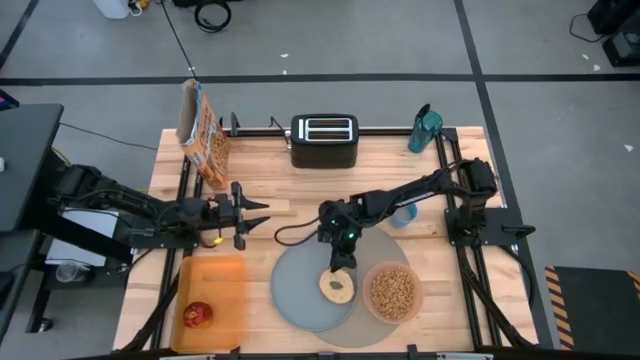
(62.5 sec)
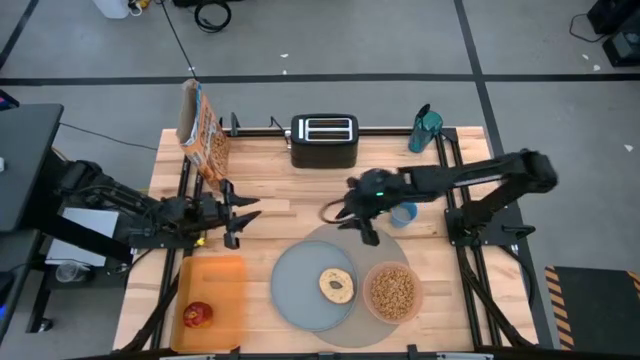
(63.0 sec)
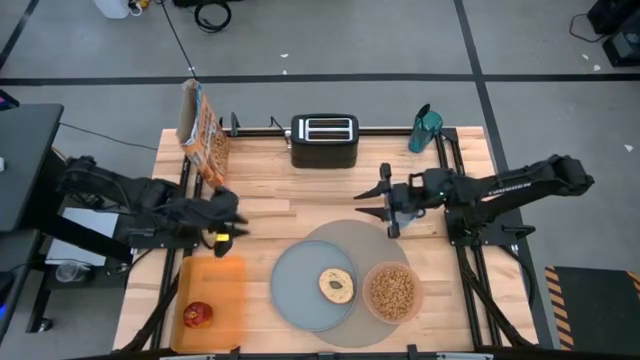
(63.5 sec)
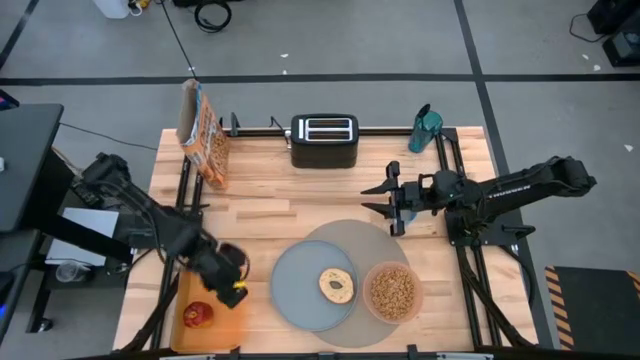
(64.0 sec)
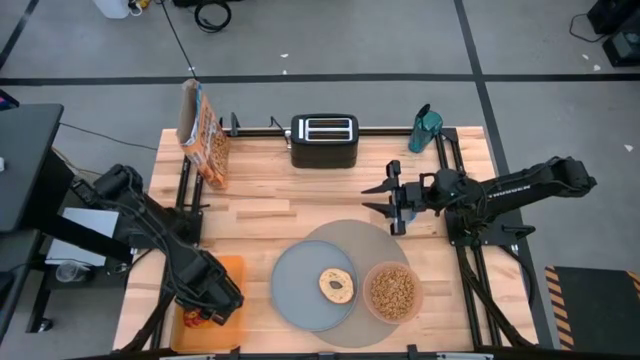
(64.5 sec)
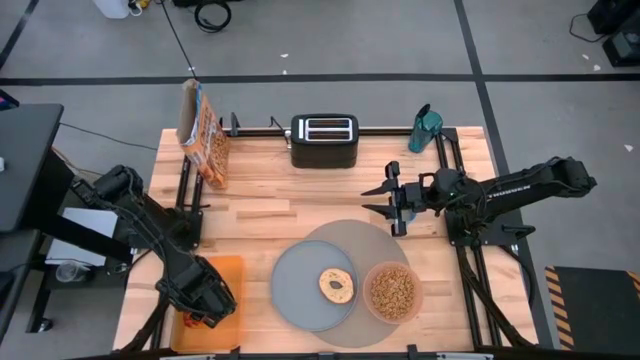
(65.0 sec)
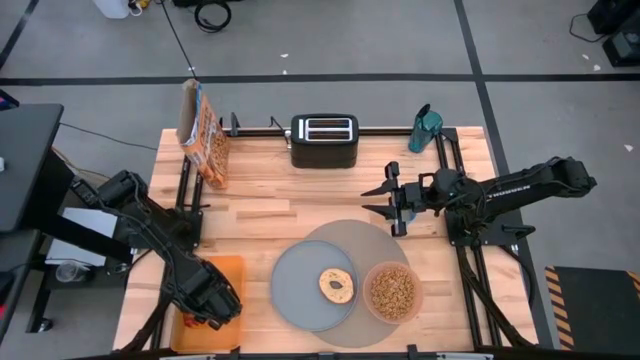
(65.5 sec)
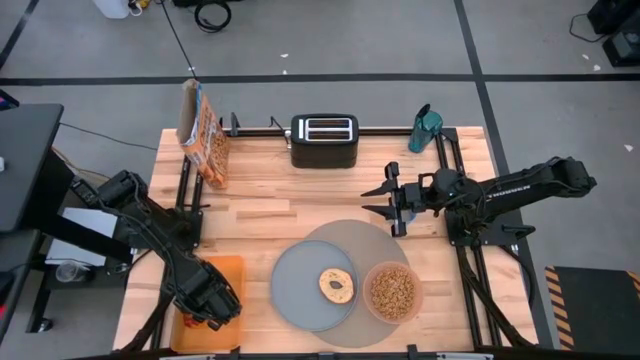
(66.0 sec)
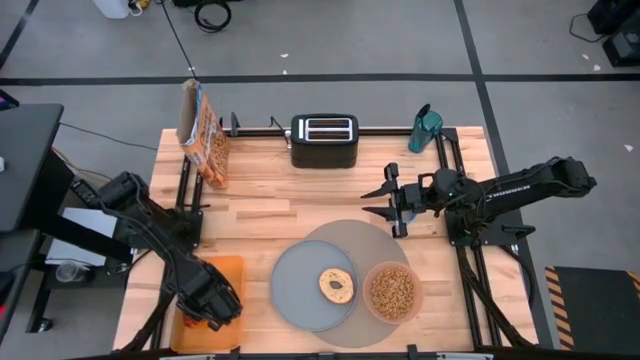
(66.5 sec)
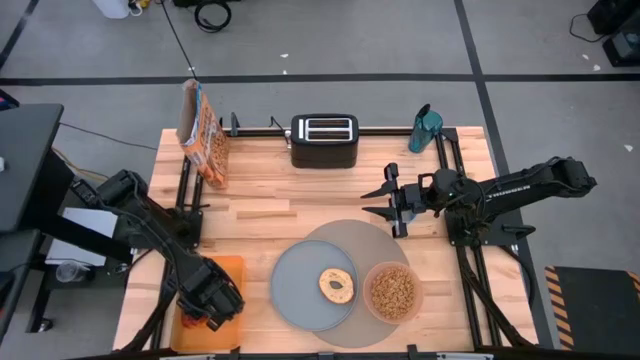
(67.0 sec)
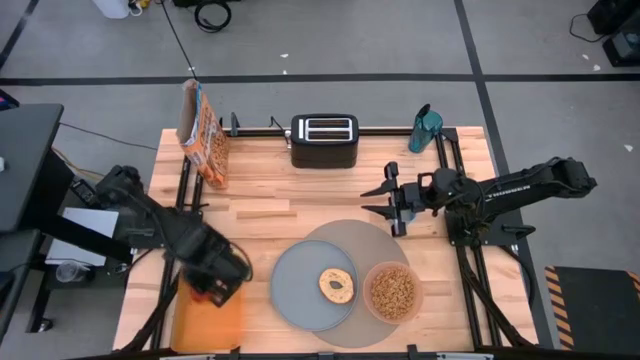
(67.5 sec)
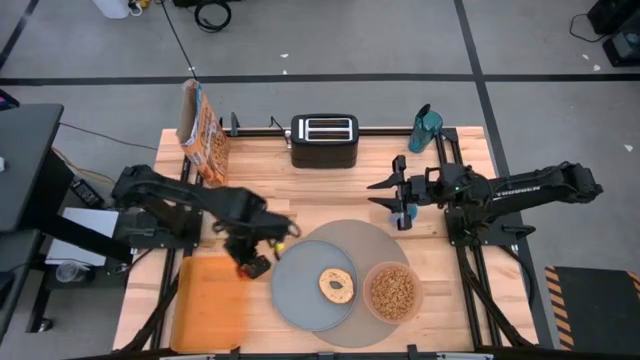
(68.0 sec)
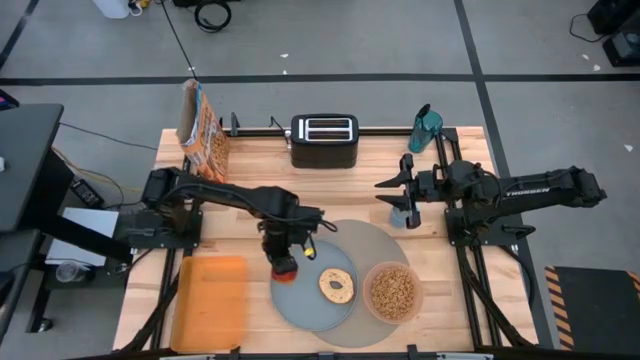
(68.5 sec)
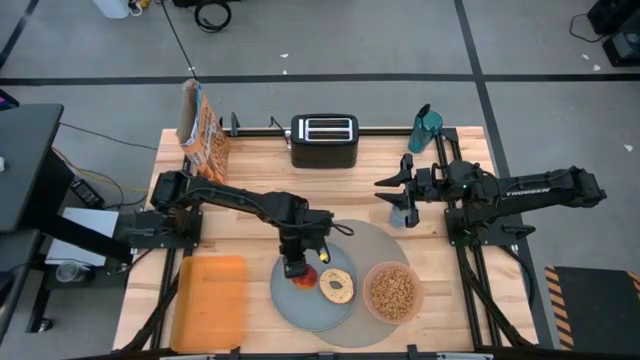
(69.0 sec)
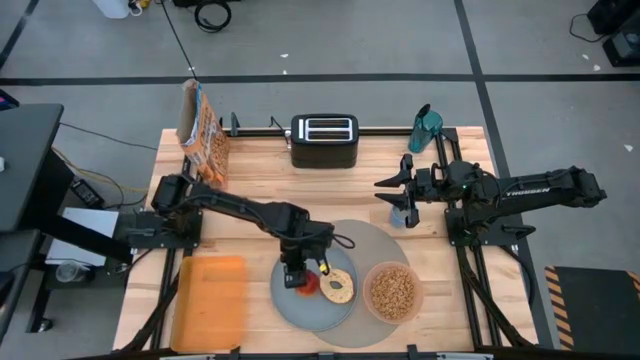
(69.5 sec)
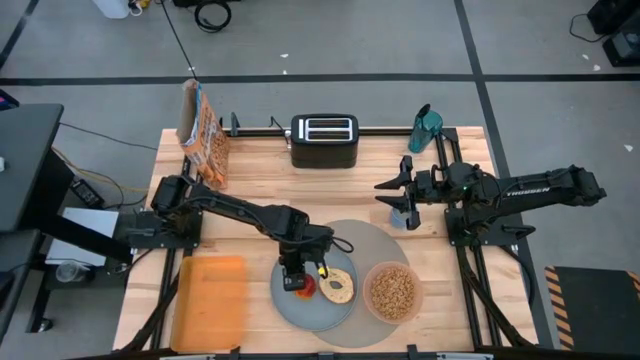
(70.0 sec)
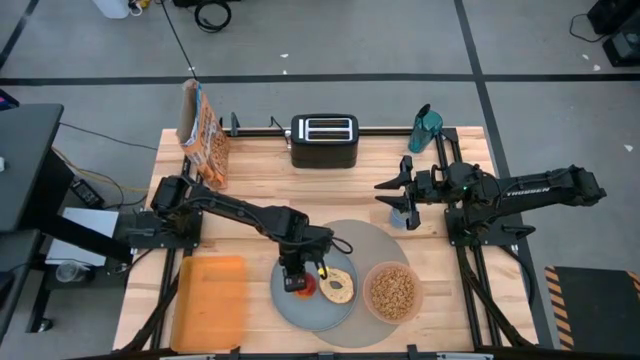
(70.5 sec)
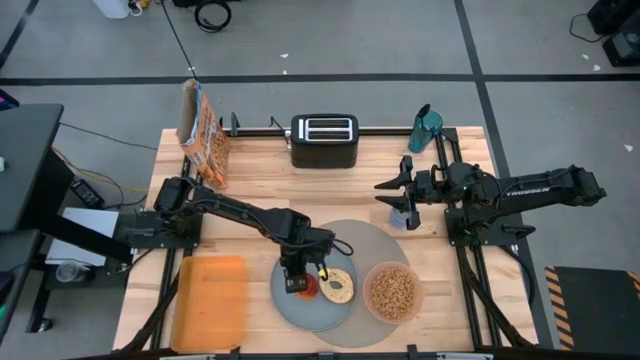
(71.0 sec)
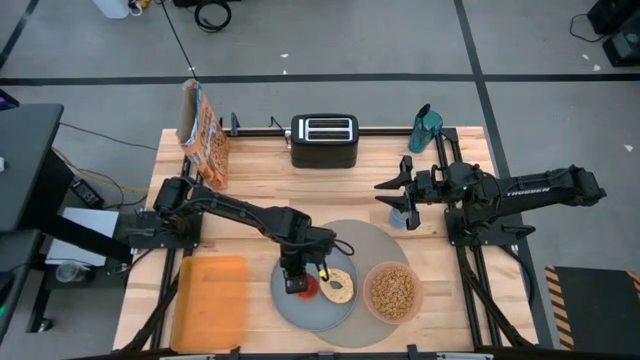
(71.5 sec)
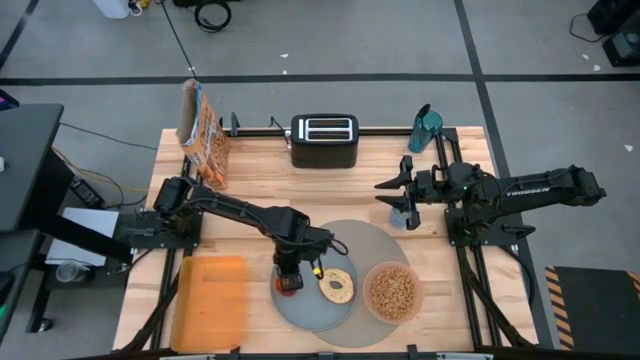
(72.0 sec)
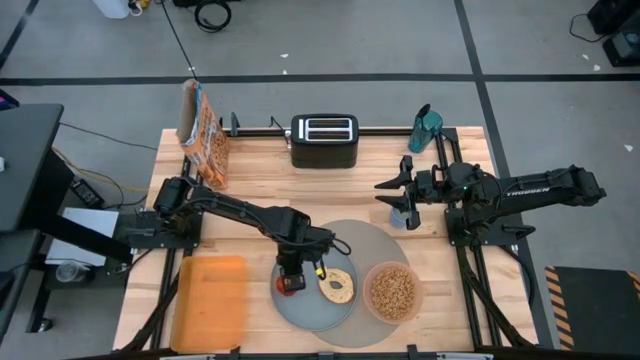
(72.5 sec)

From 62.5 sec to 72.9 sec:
Task: Arrange a breakfast setting
Put the apple on the blue plate to the left of the toasted bread

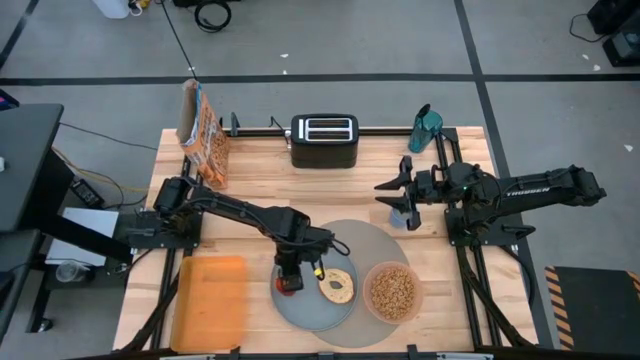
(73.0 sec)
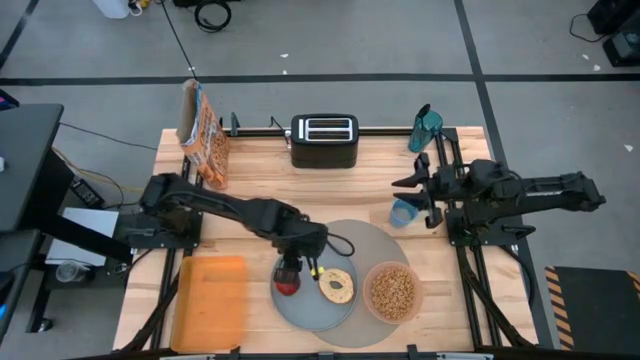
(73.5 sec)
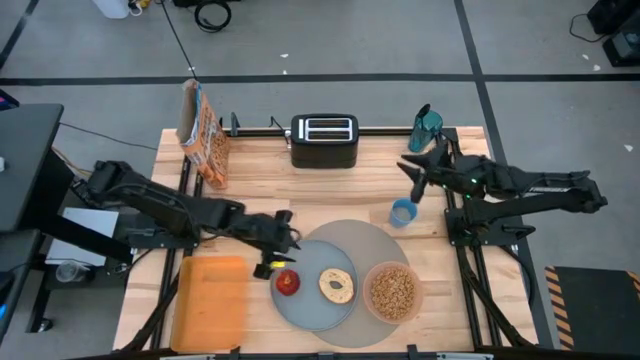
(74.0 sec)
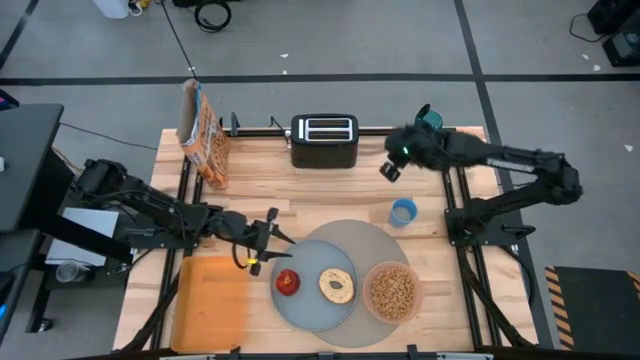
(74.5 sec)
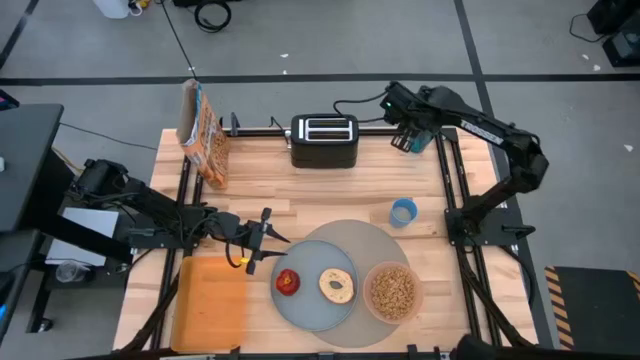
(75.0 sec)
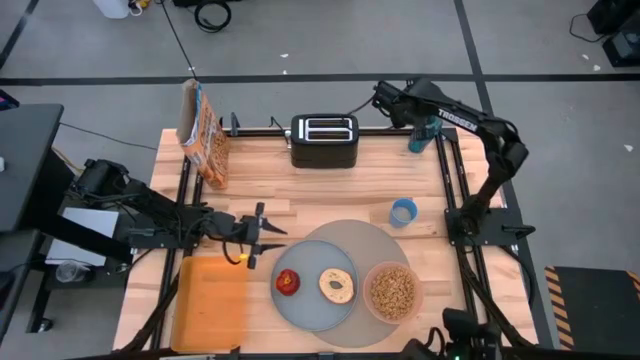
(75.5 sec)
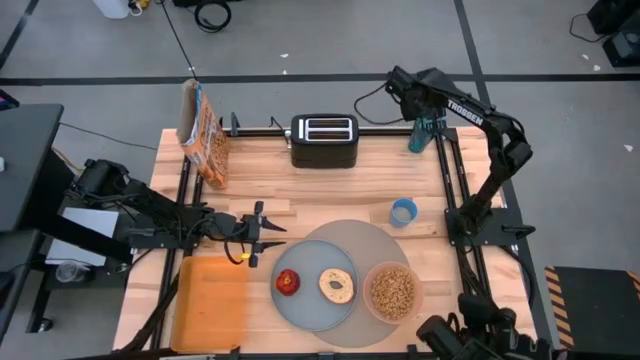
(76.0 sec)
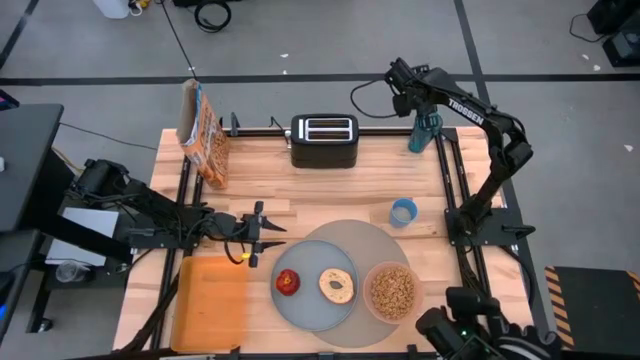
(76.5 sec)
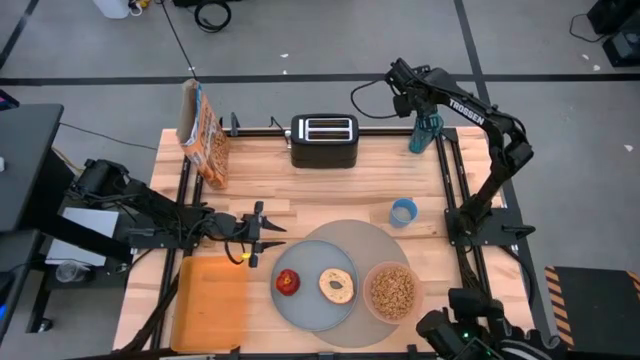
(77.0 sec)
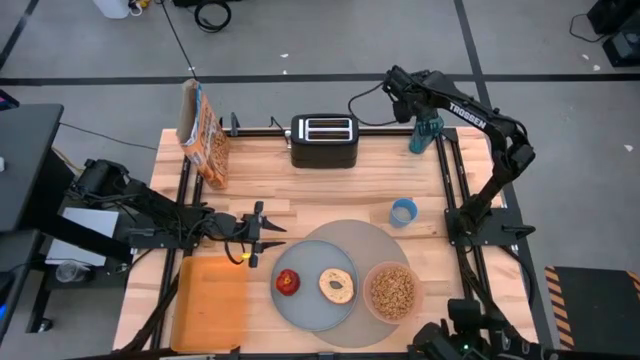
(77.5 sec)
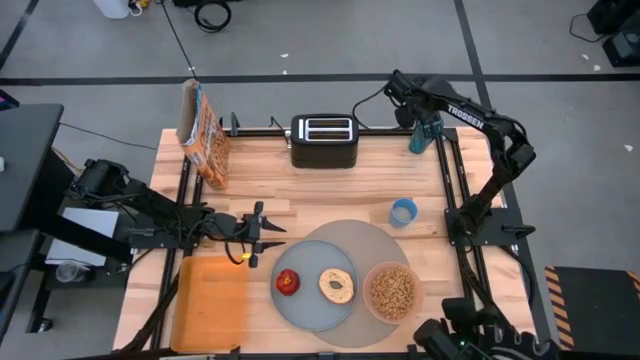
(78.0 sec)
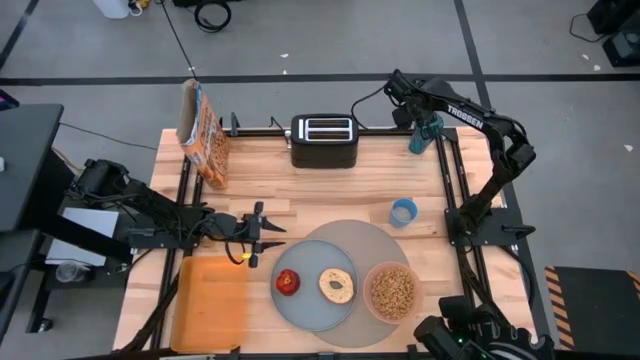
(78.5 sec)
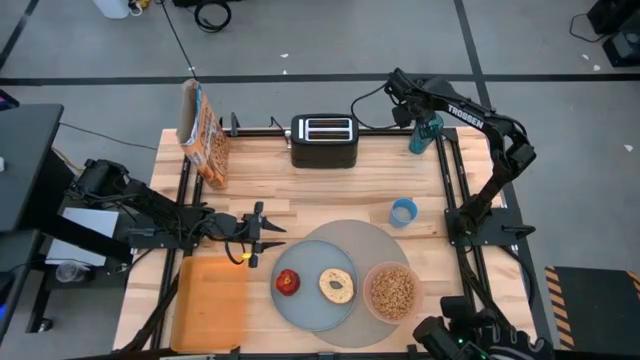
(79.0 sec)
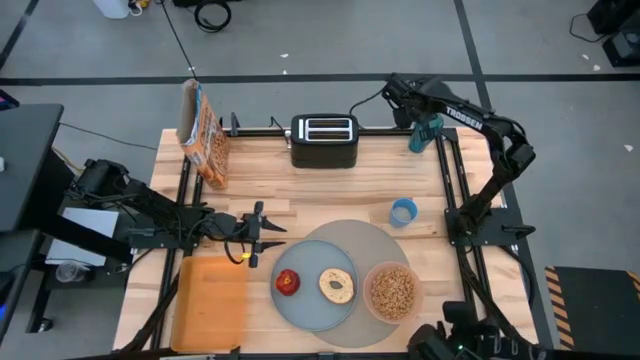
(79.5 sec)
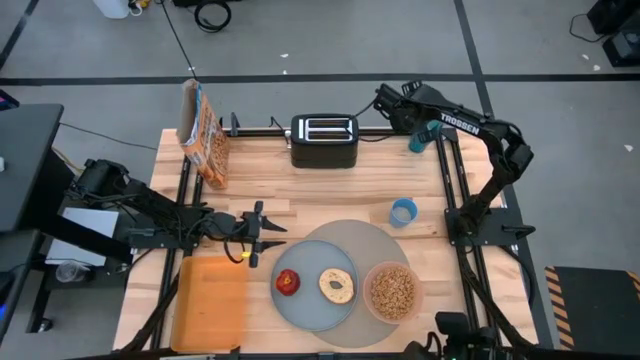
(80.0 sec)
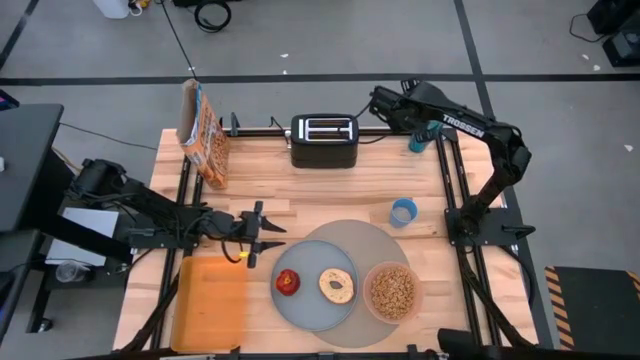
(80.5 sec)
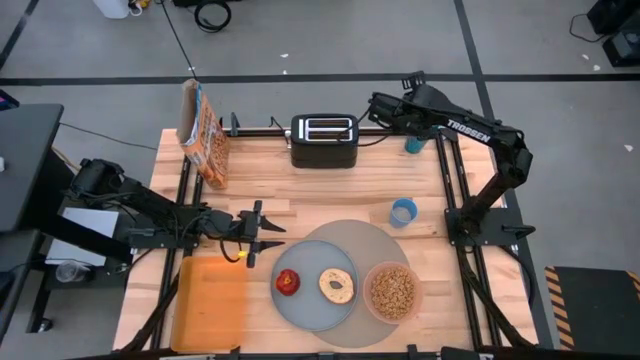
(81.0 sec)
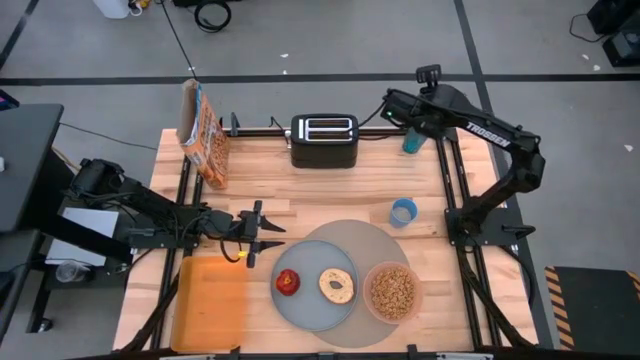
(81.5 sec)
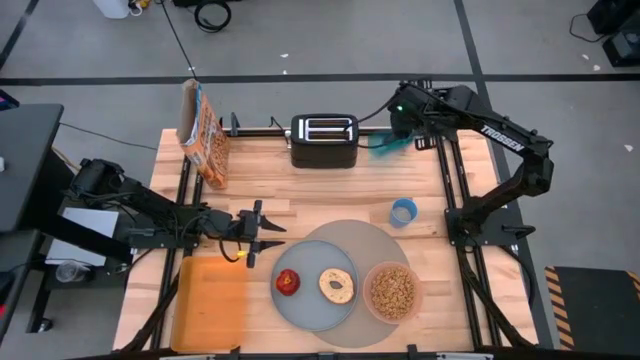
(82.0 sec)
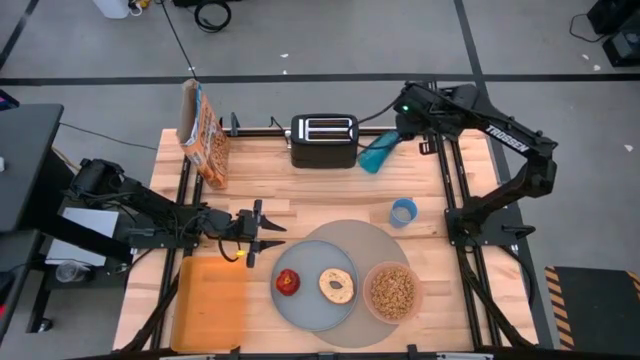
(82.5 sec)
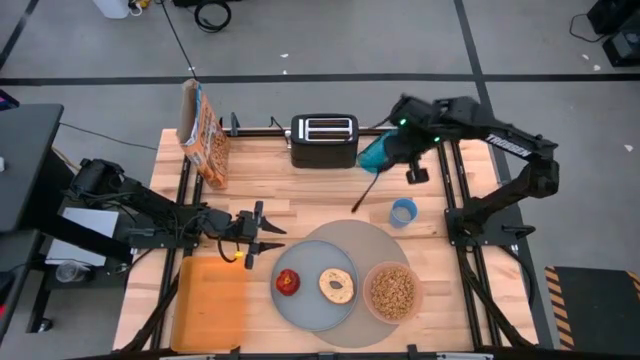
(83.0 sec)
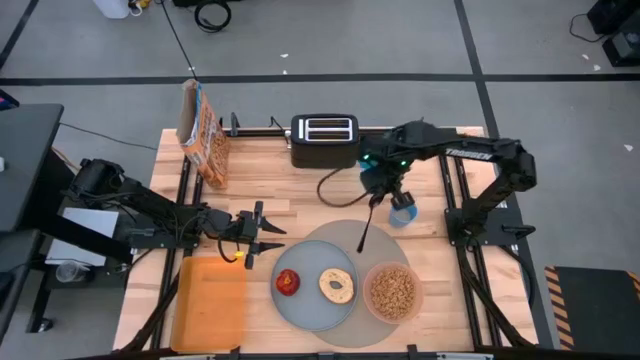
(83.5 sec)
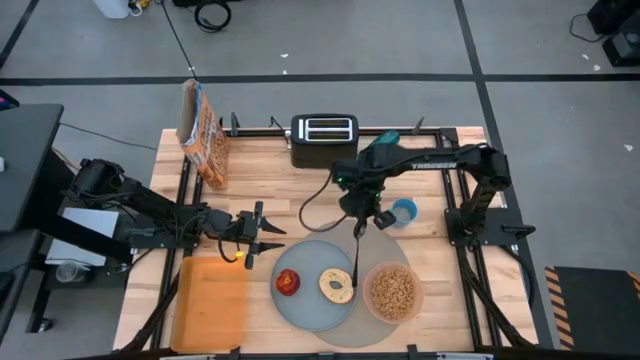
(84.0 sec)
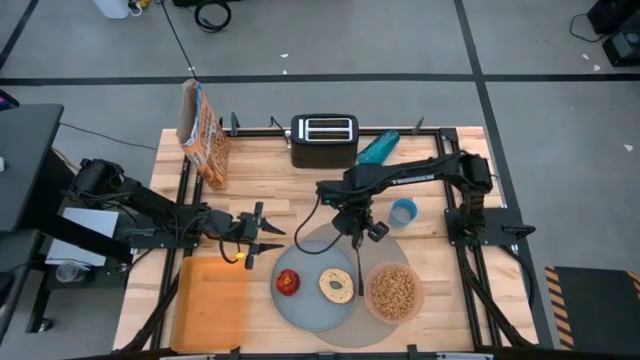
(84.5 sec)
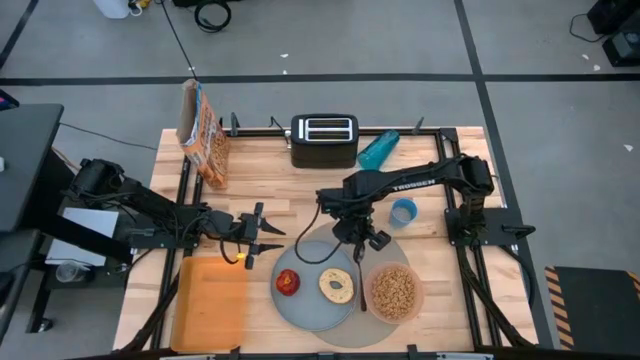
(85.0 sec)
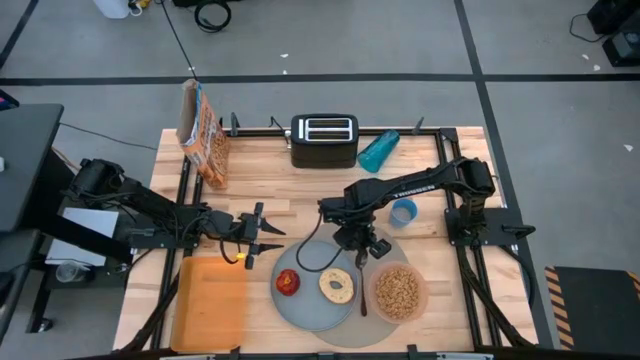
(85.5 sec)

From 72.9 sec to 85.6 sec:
Put the spoon on the gray placemat to the right side of the blue plate
